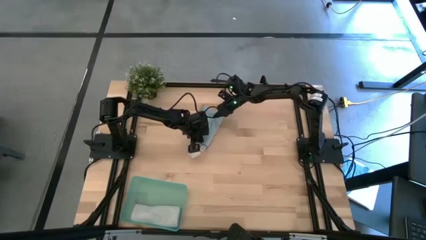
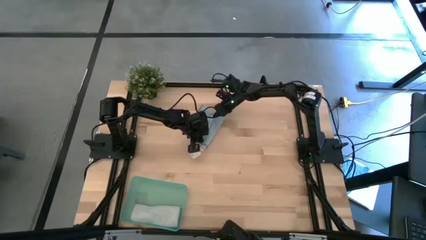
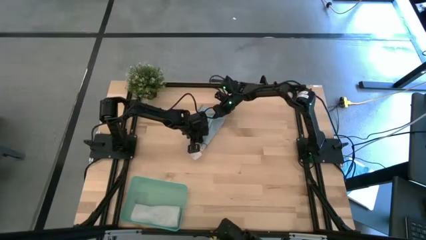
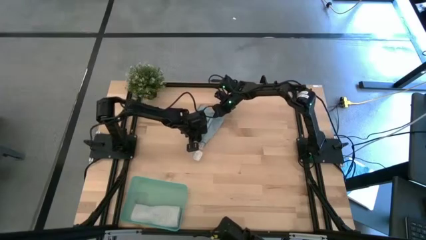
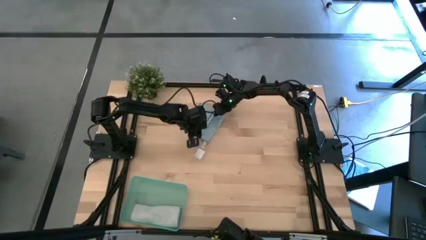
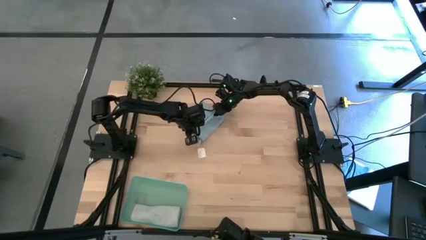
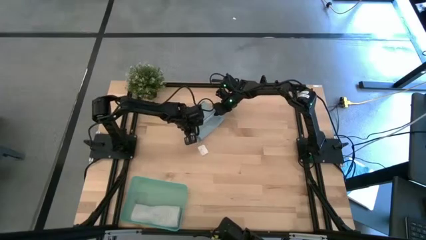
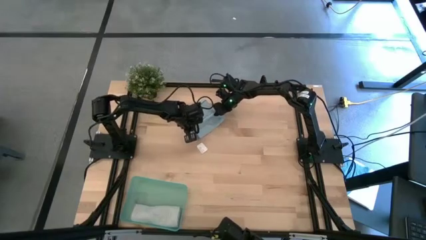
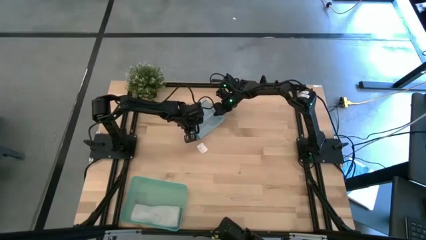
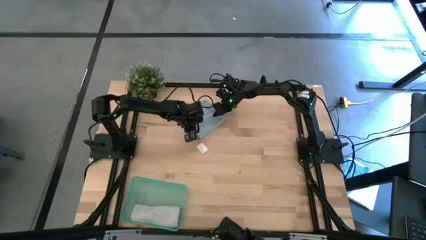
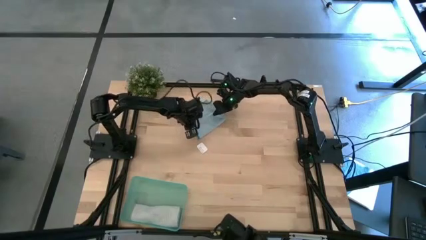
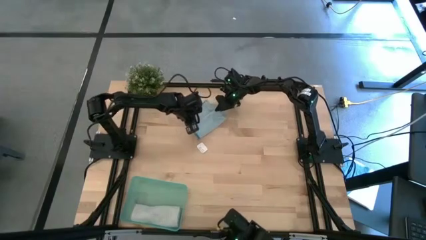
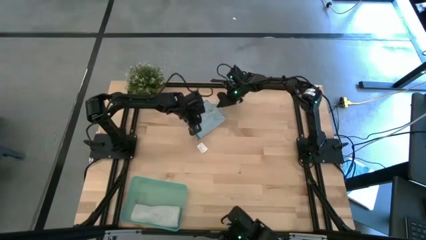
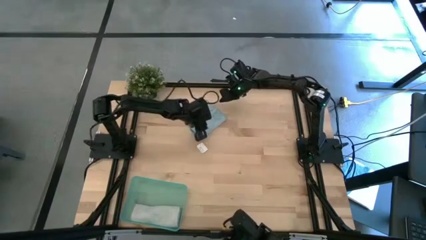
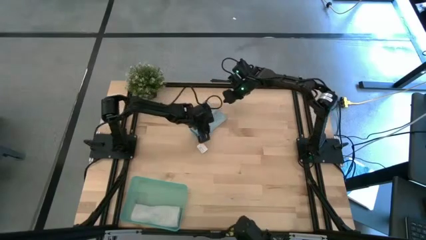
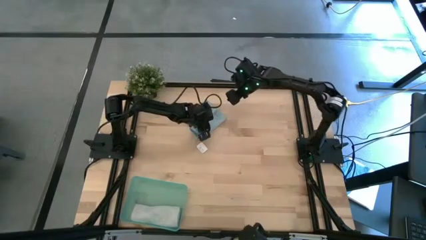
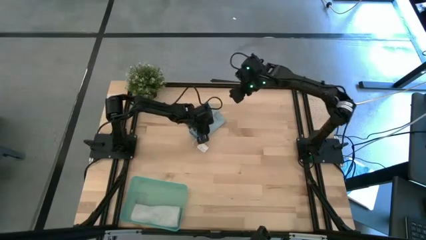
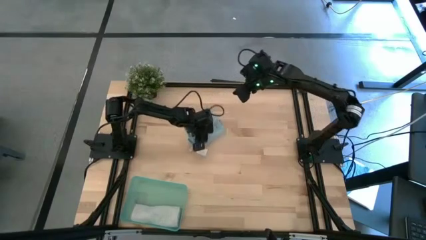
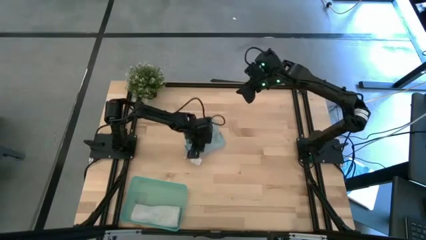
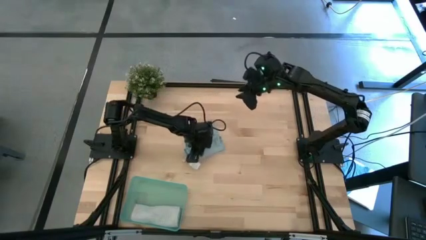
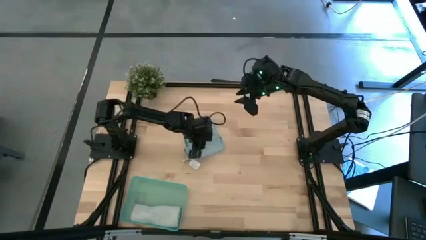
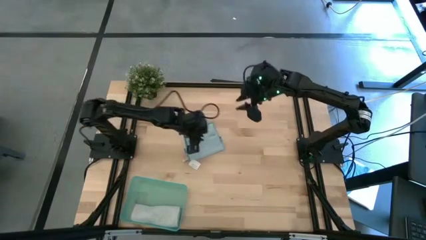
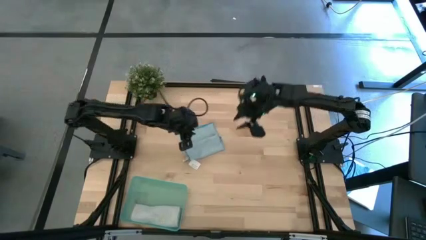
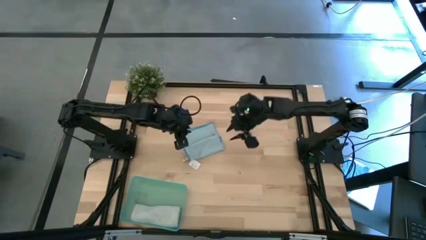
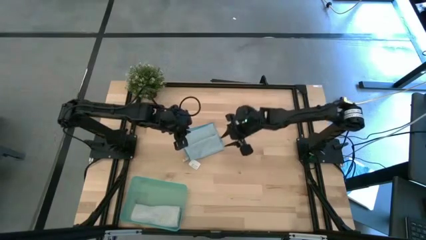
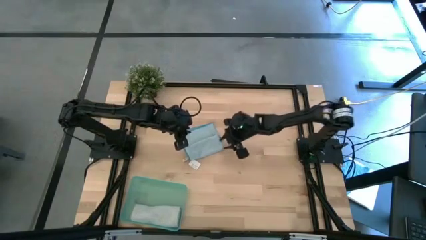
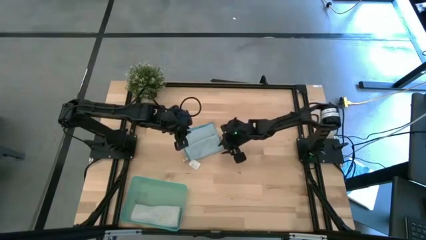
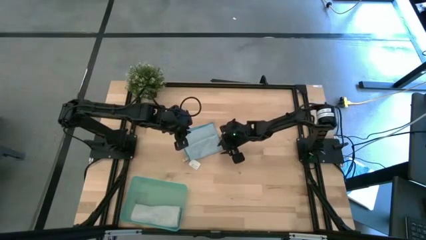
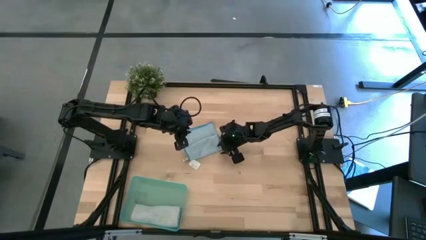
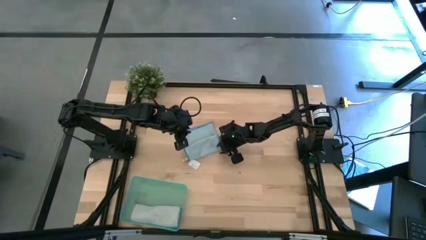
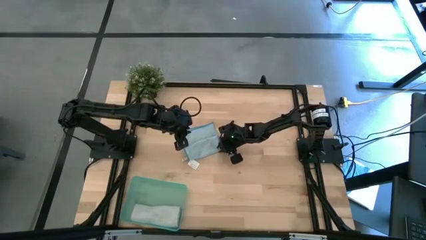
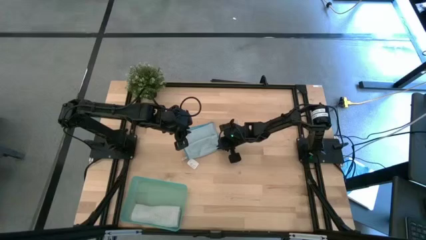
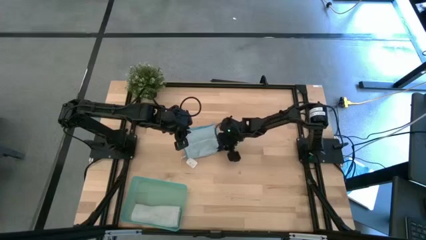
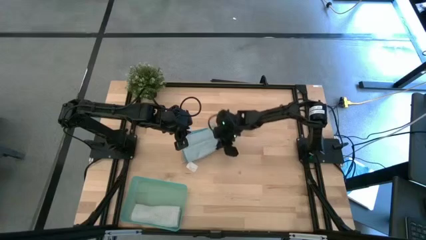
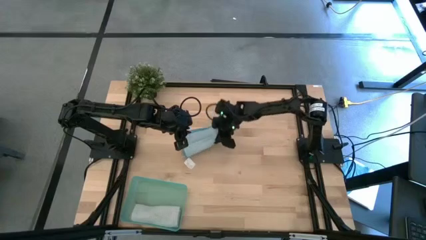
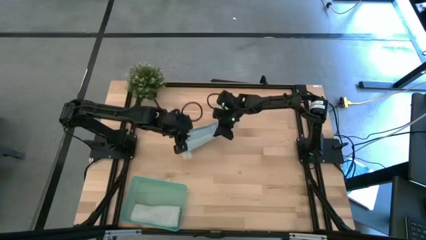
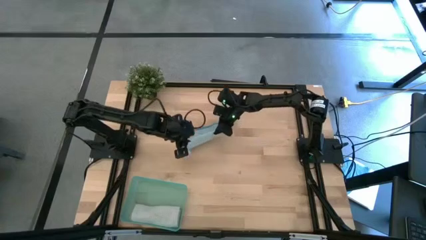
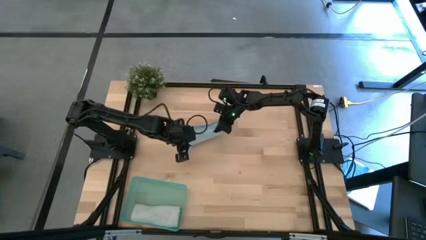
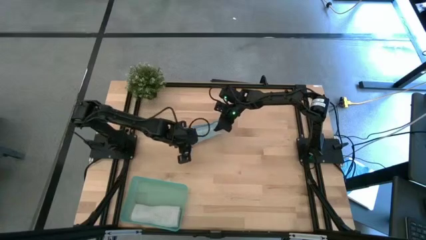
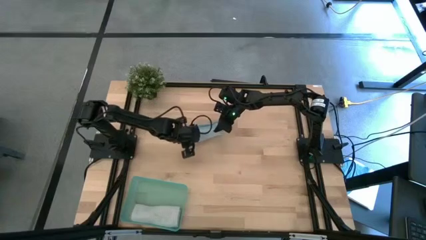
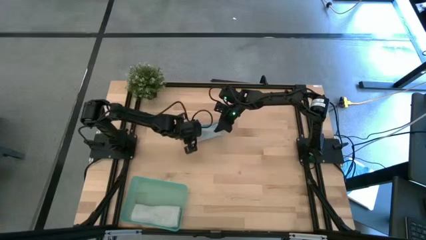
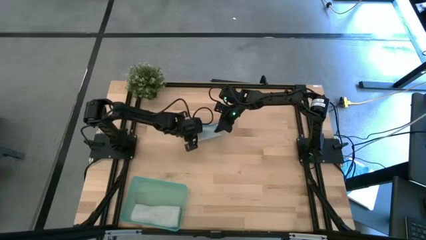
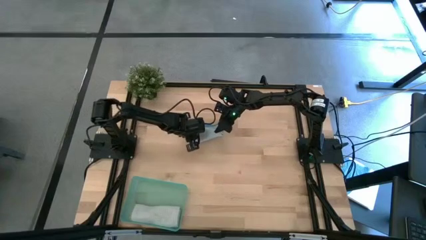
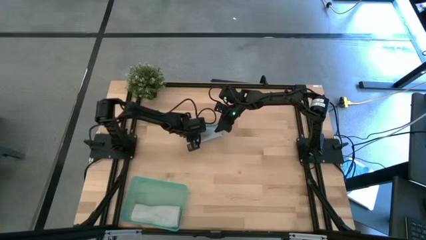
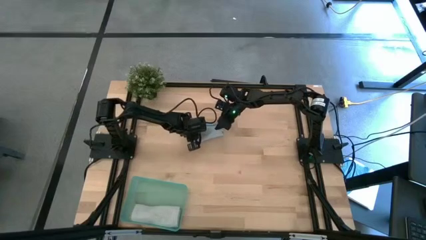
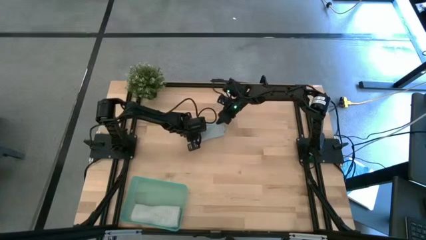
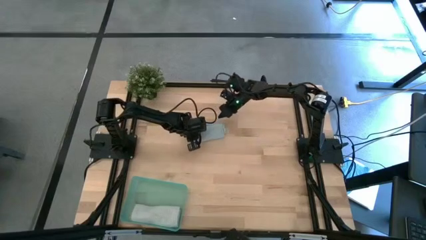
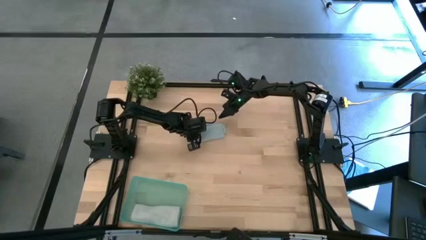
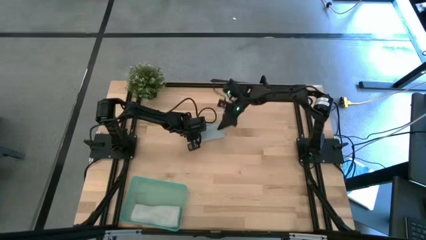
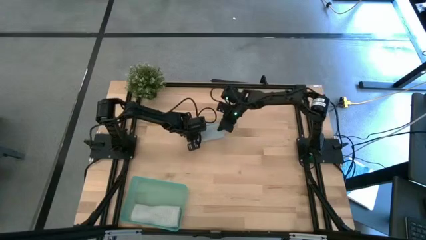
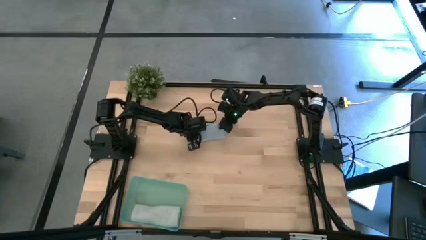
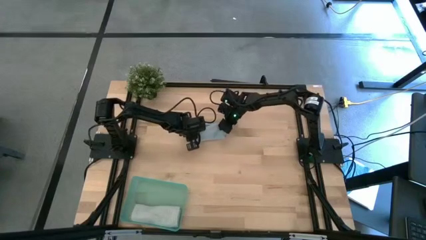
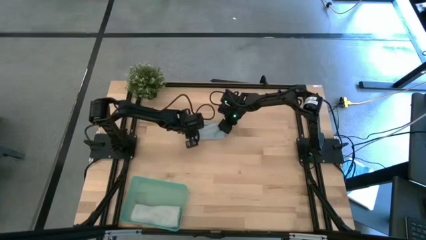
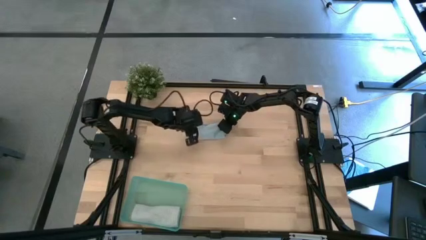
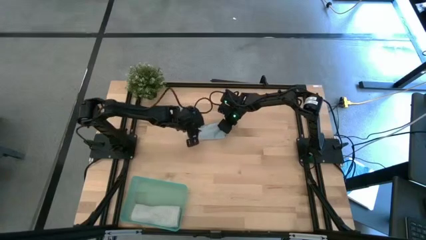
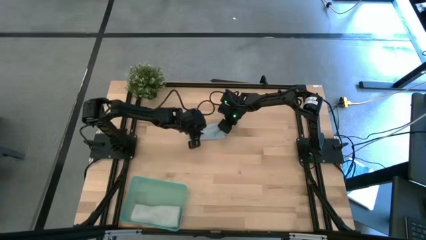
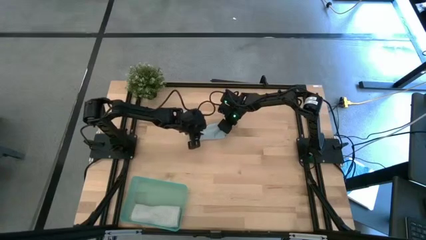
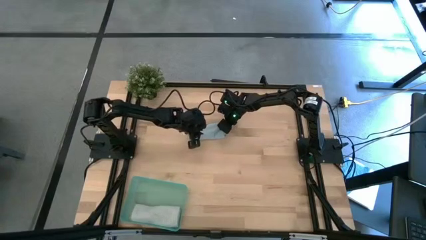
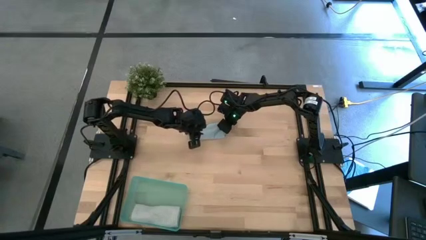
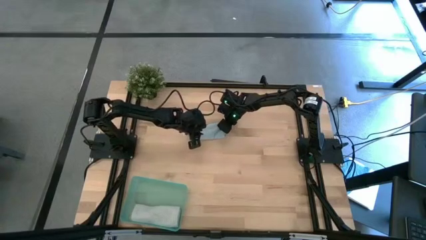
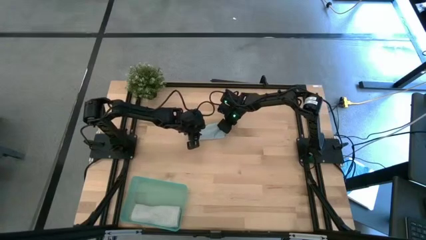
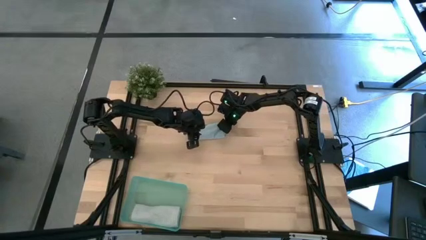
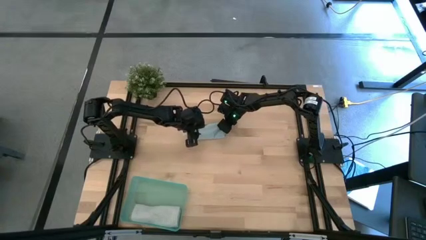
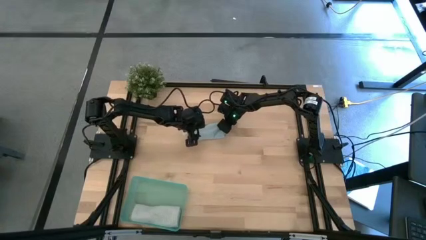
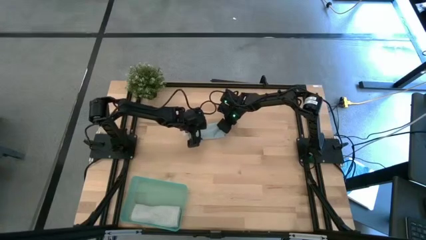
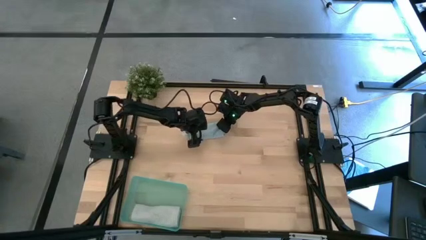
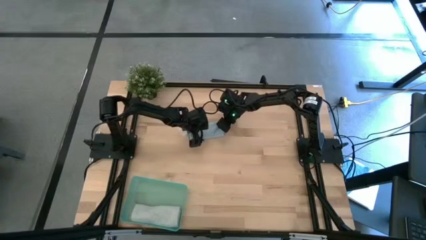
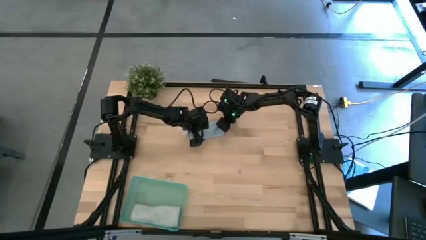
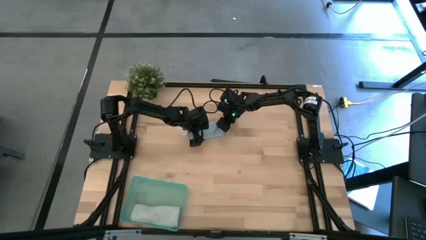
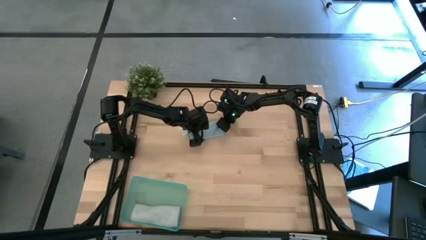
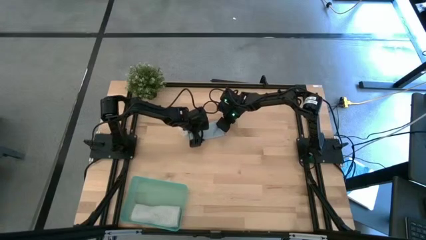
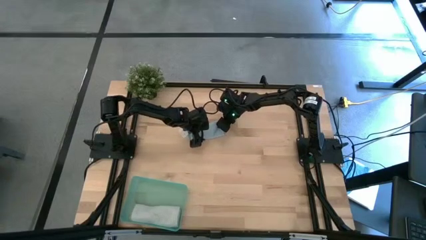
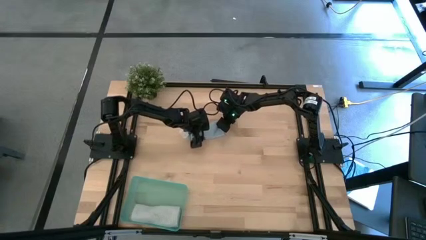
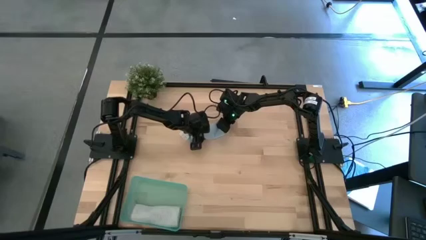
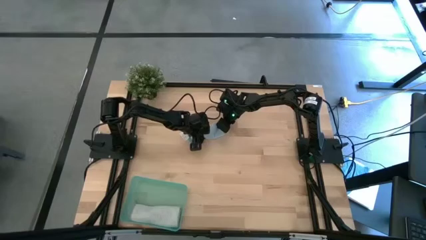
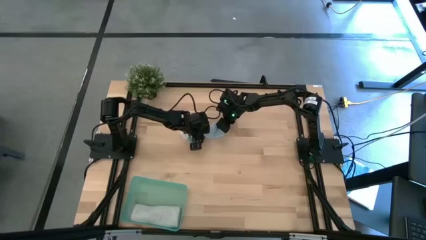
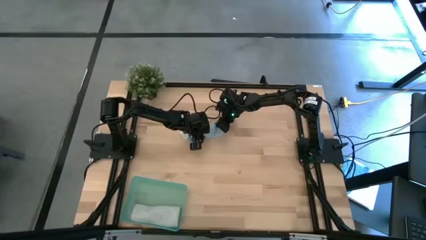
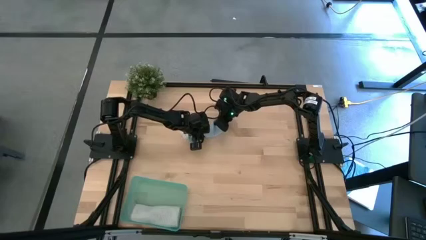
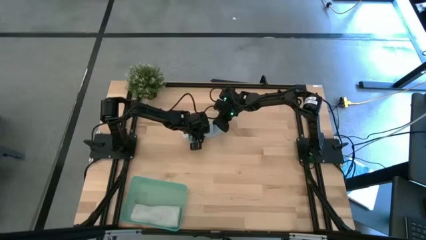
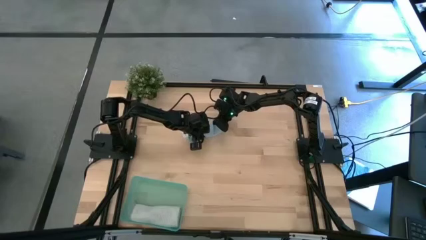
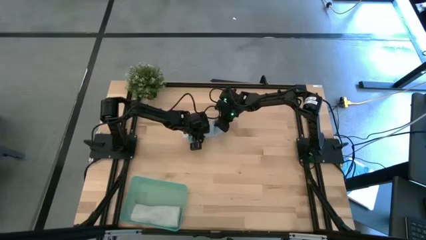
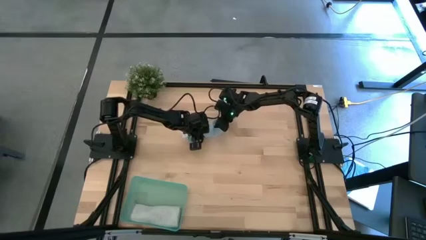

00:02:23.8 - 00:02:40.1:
Task: Roll microfiber towels into tight, uniform cylinder then place into a basket
Roll the blue microfiber cloth
